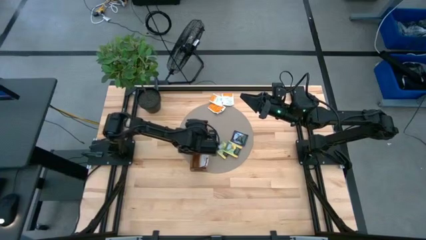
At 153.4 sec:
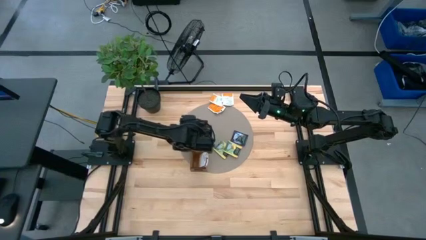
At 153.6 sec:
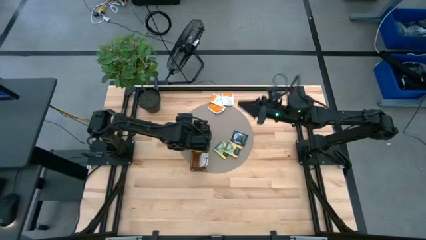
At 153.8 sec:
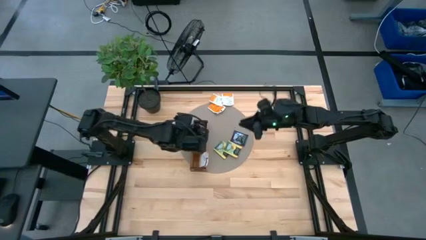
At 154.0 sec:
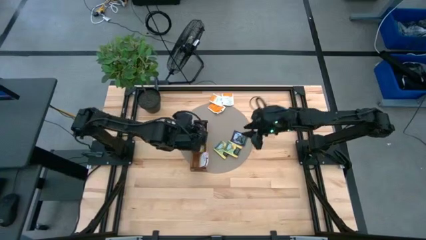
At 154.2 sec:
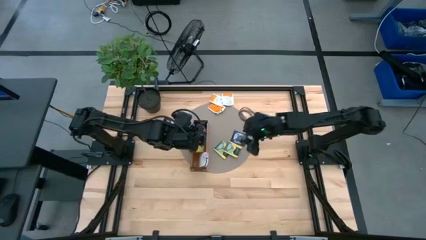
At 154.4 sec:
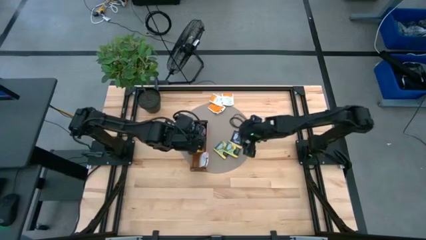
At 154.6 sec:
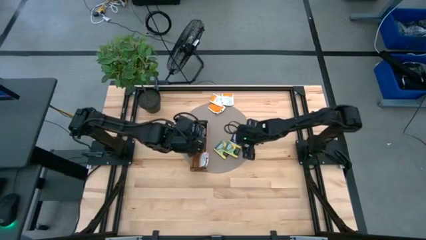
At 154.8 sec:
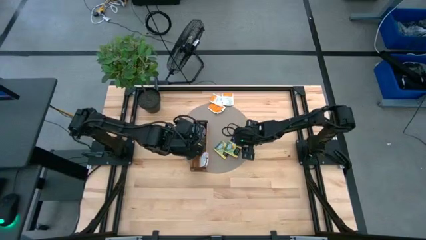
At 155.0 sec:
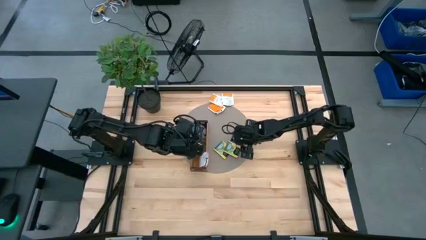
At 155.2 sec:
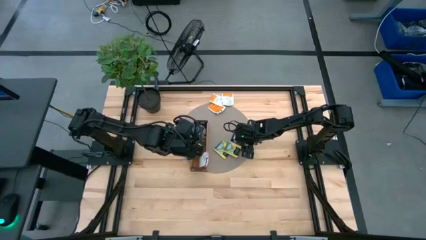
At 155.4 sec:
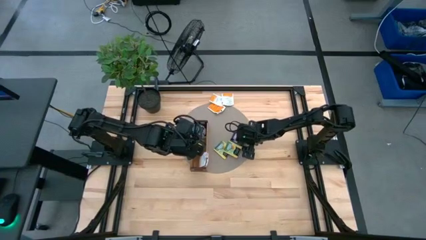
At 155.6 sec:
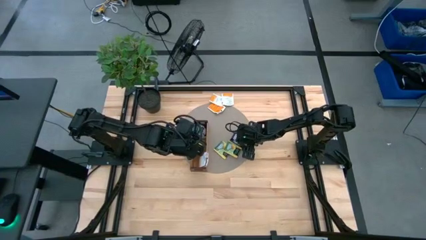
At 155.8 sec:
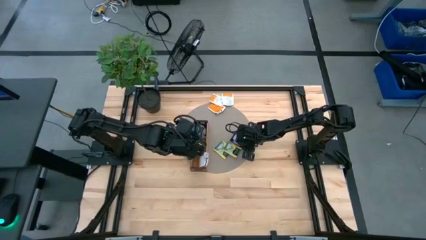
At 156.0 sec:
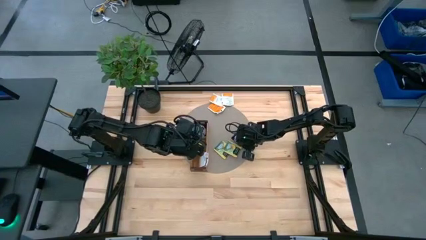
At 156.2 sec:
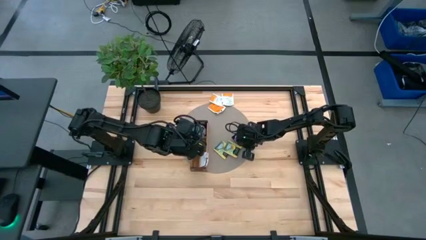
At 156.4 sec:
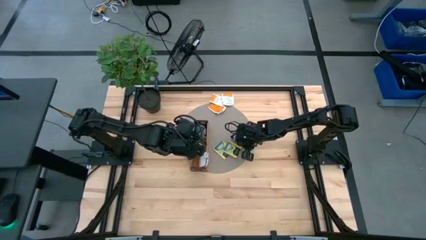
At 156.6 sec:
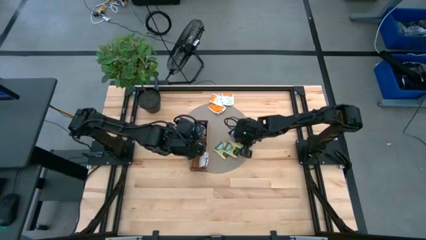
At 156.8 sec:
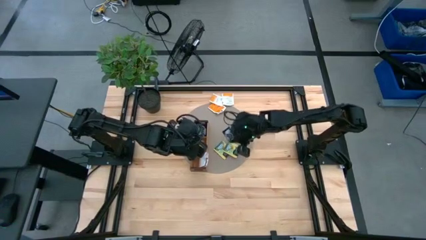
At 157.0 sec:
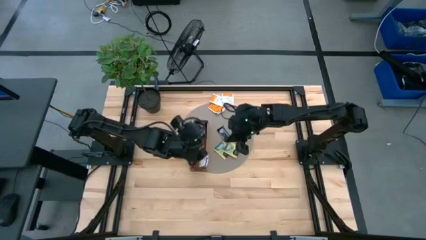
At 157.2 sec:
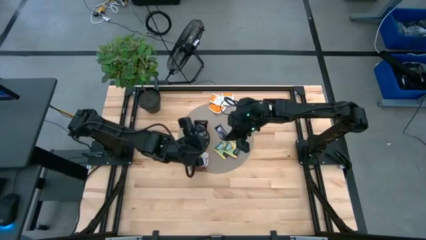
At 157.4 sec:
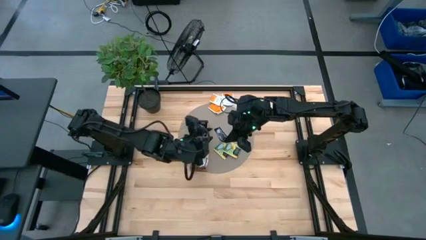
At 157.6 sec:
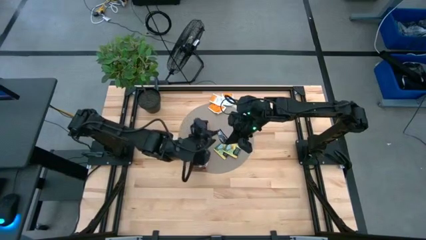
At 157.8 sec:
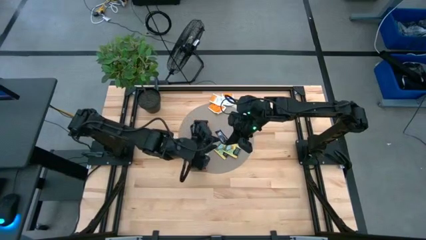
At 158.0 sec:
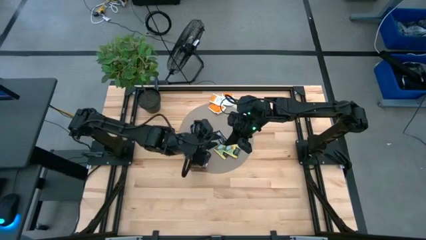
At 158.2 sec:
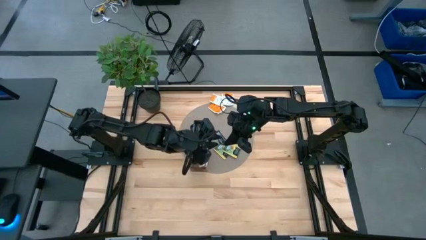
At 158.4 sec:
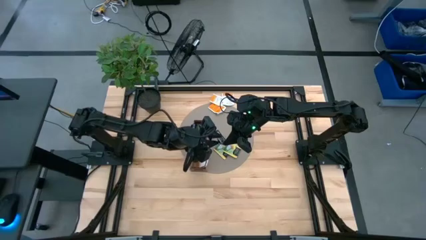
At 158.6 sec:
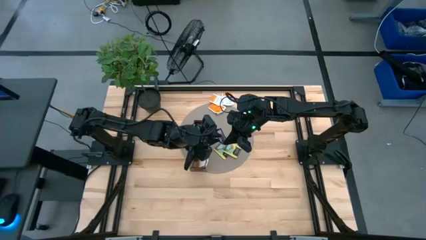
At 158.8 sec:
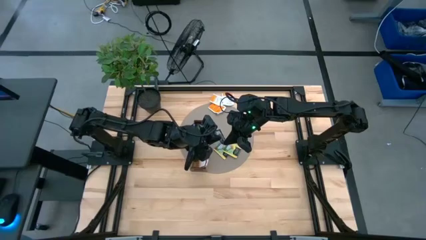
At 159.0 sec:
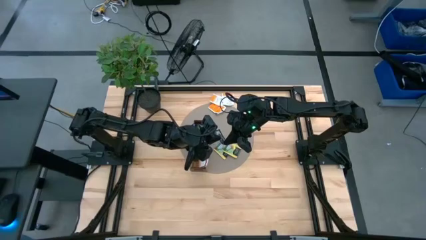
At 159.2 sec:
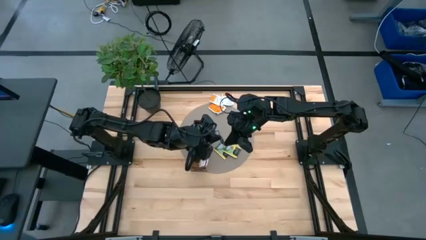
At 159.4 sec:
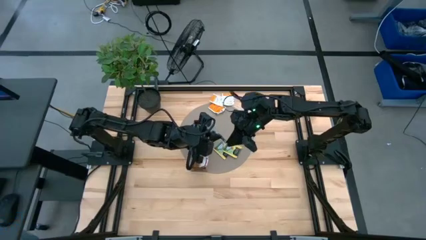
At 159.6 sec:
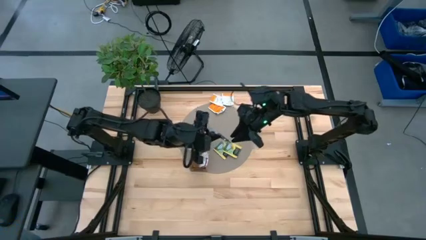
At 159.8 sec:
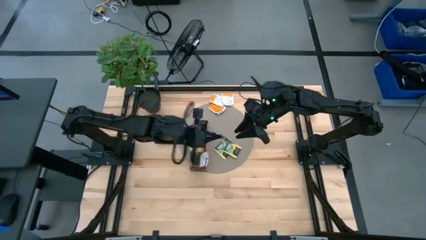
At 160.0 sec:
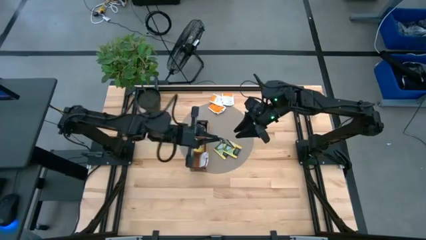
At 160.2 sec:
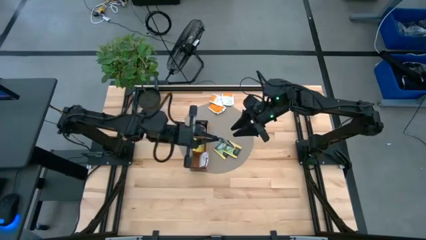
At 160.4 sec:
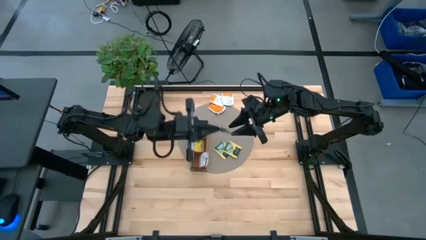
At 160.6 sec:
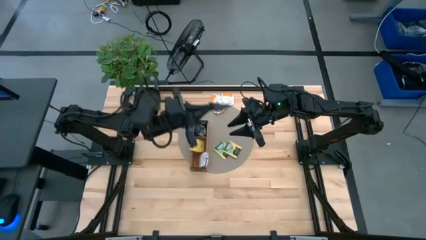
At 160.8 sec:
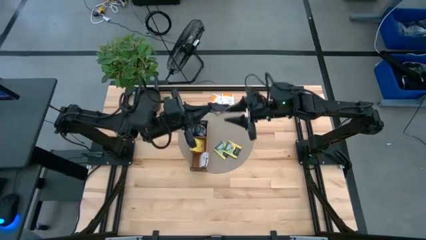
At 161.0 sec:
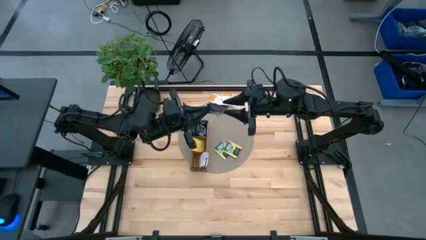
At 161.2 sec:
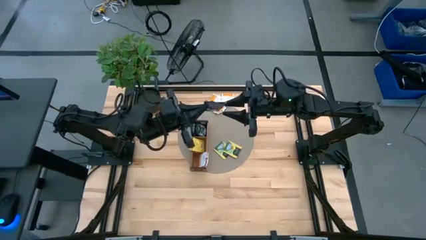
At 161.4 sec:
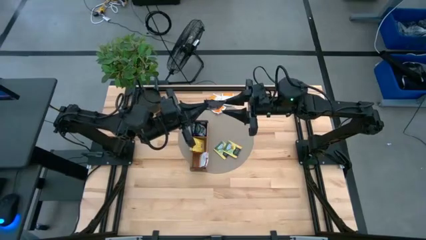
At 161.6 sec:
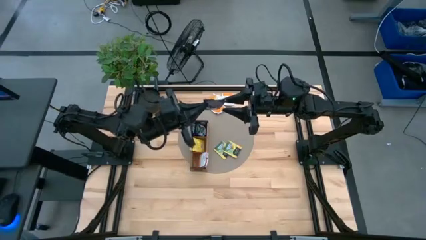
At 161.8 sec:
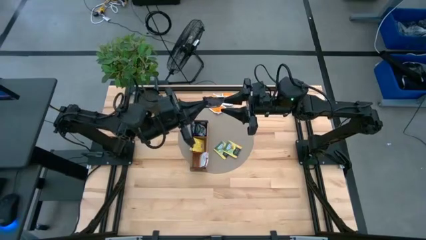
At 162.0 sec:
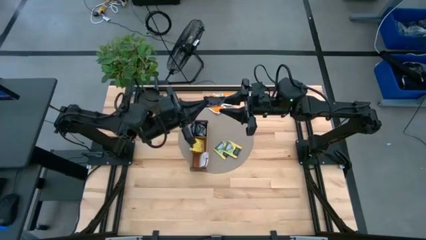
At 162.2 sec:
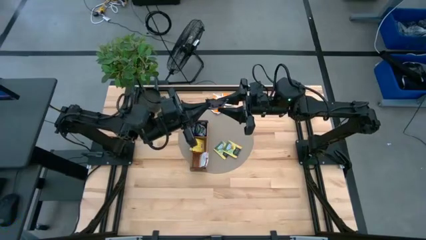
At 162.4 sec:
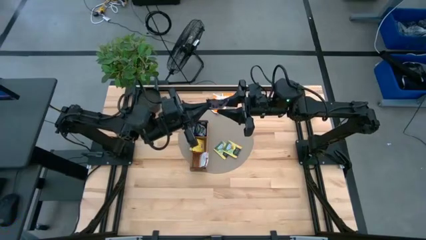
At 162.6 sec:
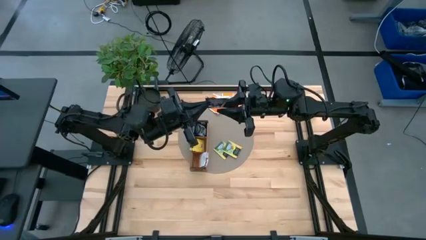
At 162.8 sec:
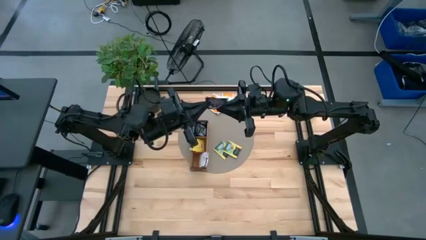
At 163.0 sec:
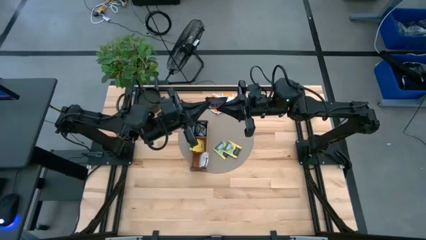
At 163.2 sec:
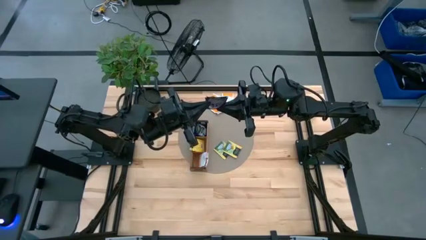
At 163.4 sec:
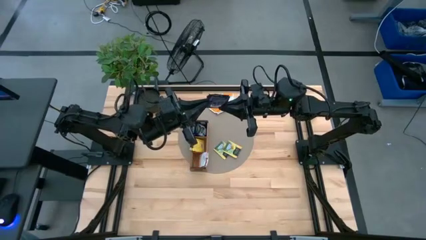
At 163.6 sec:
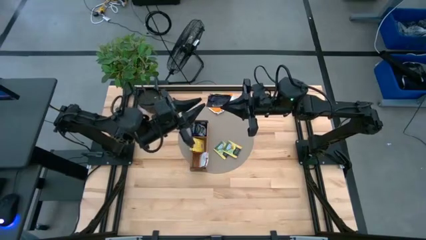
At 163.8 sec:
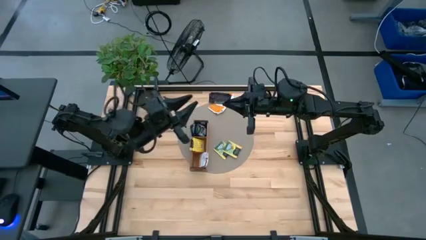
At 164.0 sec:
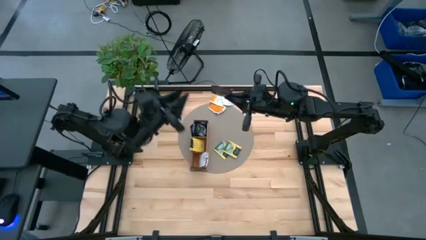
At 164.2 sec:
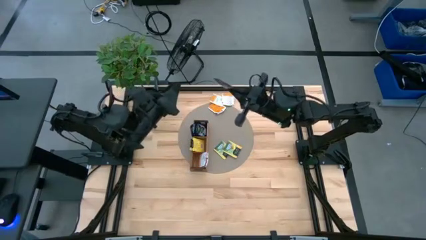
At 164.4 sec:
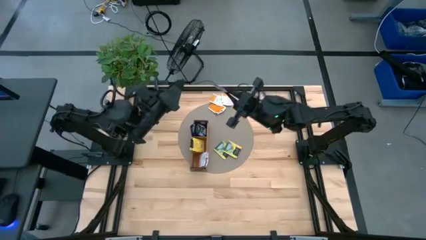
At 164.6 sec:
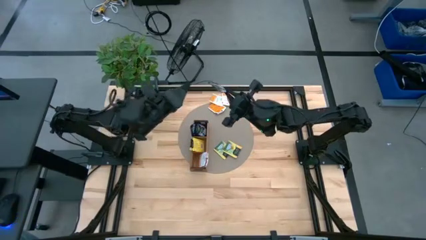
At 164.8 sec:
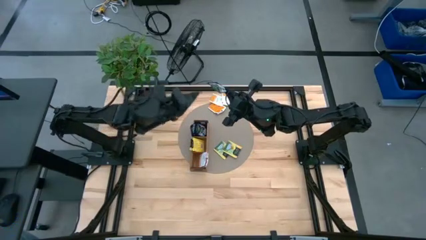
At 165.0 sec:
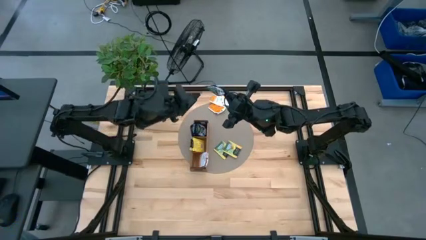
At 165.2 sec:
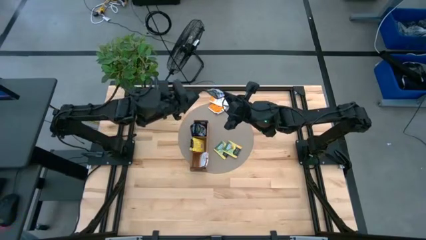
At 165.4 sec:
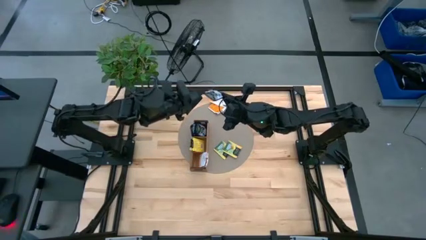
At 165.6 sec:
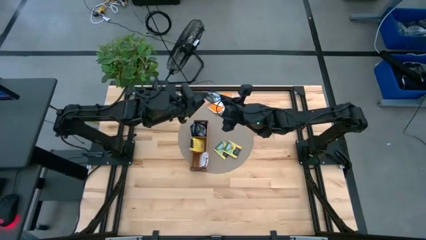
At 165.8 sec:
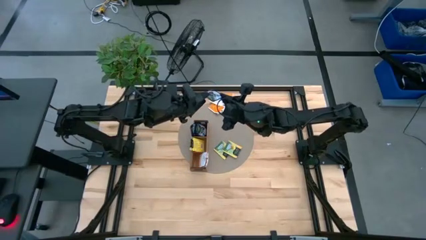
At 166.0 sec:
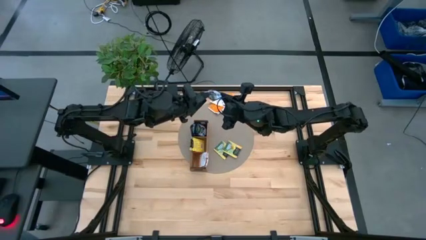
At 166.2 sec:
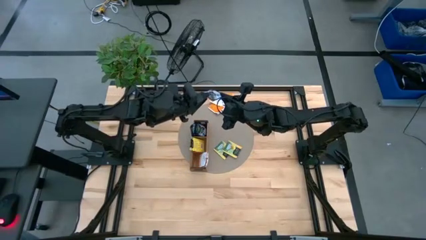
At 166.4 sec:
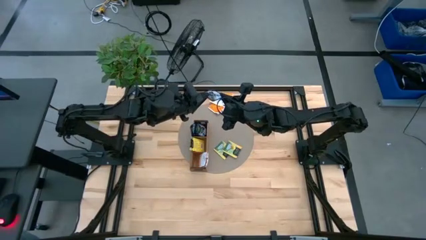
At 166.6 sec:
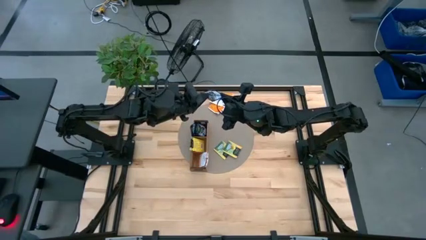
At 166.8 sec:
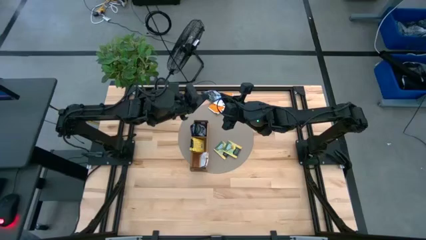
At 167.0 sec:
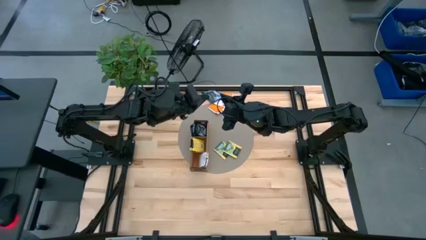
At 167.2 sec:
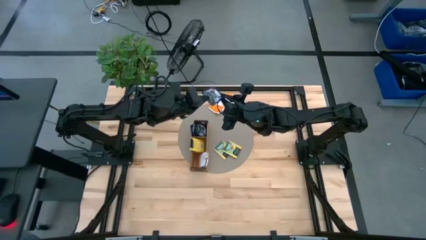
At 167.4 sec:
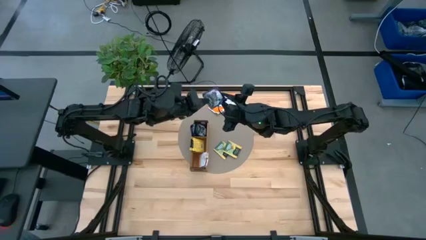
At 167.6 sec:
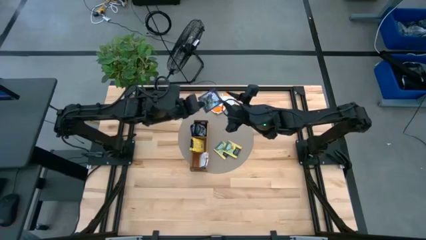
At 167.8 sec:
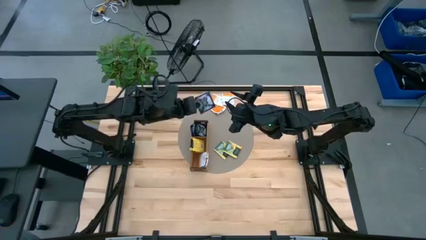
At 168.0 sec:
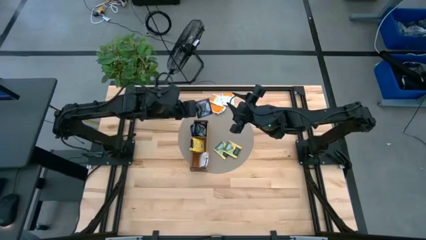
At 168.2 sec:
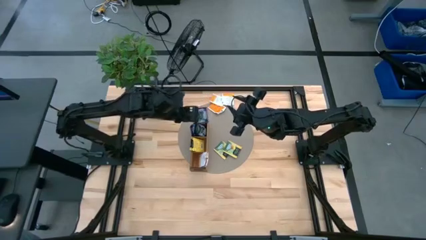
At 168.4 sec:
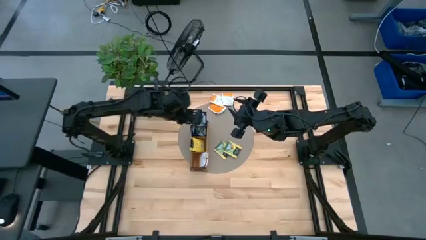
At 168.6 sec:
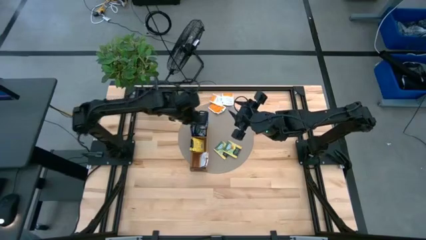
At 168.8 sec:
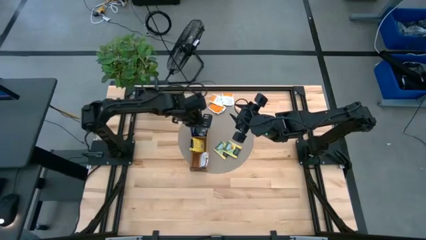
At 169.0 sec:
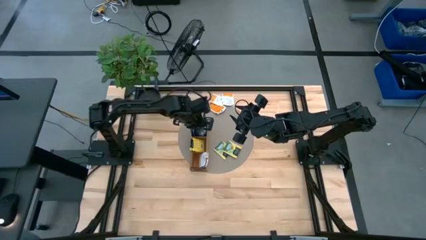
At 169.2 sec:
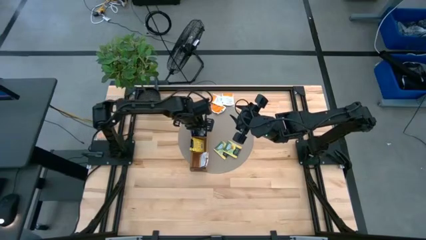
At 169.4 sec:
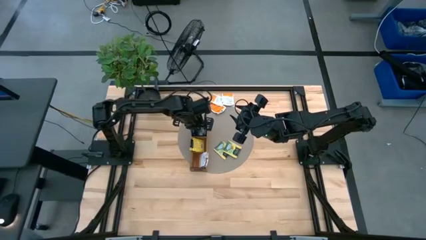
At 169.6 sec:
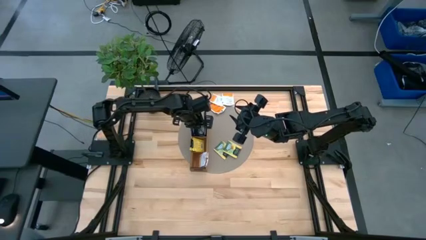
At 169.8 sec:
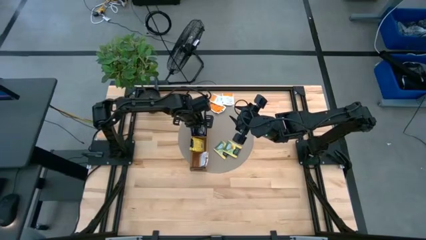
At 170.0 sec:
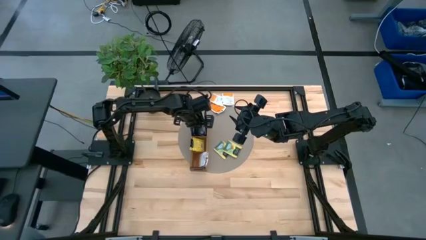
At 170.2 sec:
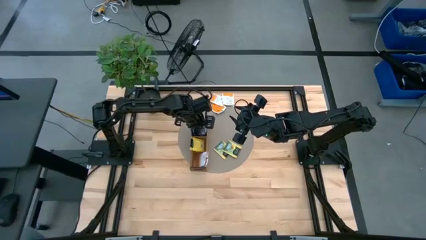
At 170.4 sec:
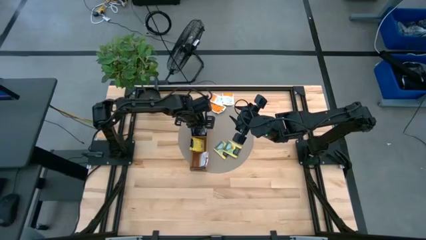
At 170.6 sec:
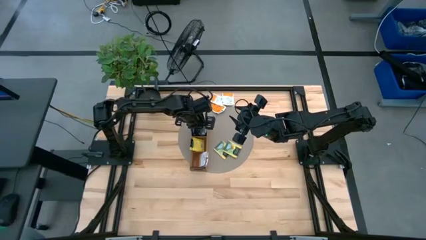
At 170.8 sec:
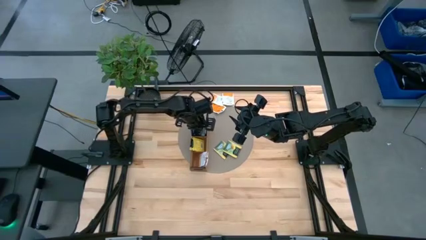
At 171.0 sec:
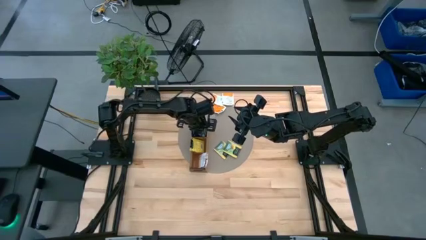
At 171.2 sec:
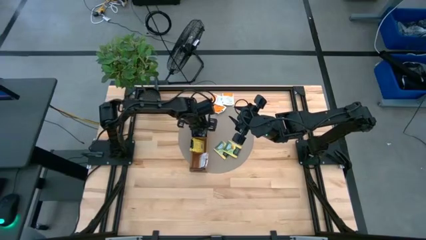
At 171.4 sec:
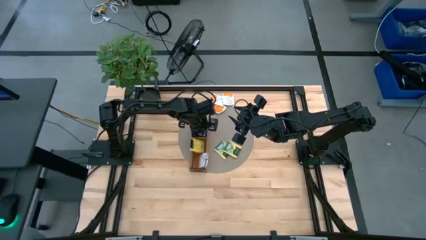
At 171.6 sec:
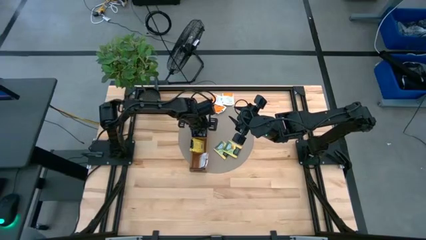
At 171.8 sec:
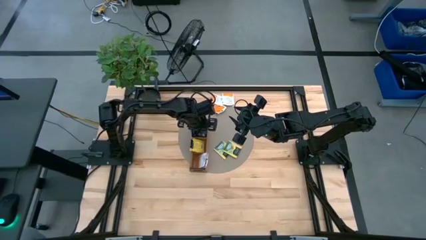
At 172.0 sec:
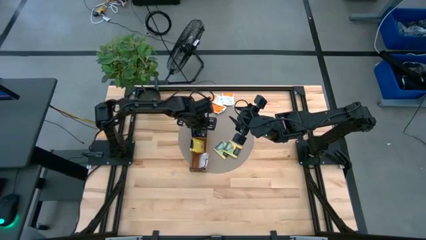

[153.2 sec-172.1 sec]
Task: Pick & Place Tea
Put the violet tea bag into the top section of the wooden organizer
